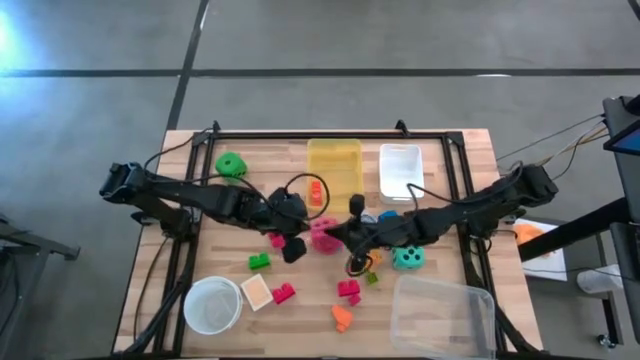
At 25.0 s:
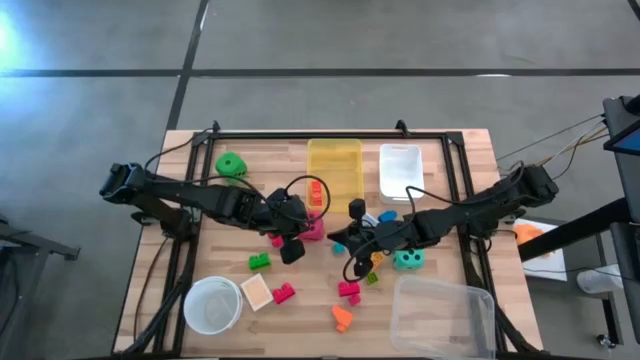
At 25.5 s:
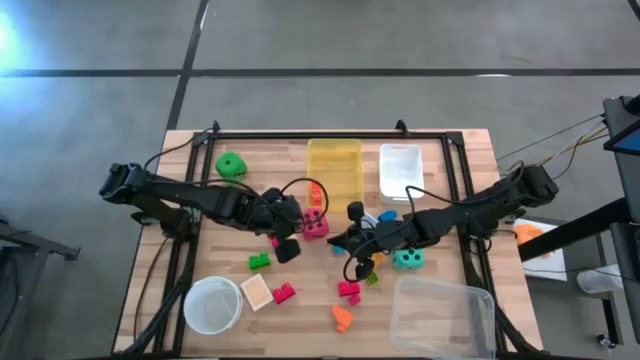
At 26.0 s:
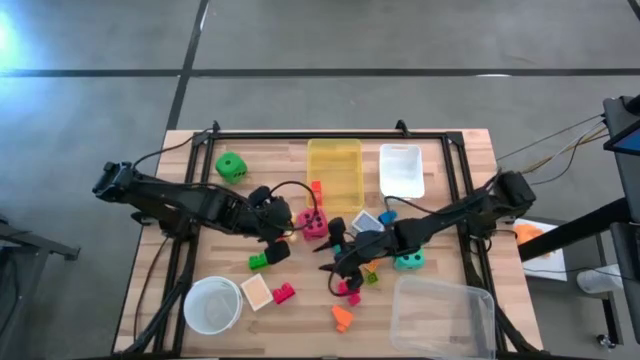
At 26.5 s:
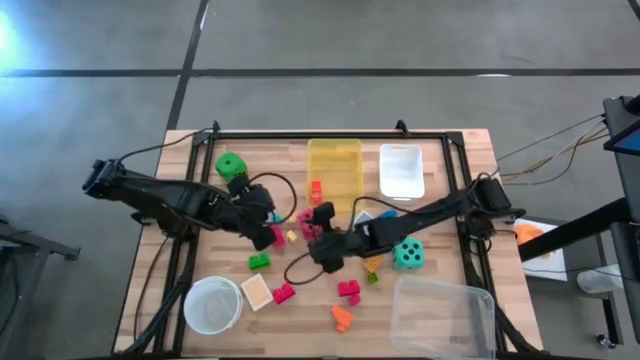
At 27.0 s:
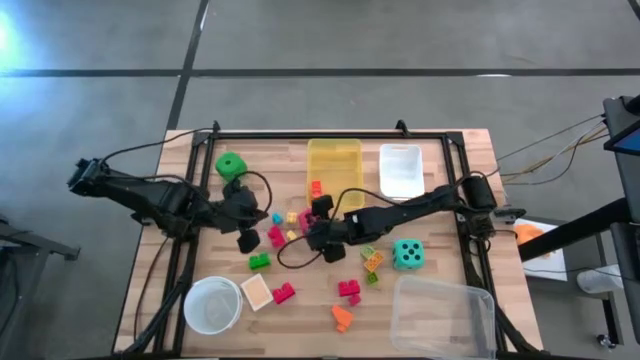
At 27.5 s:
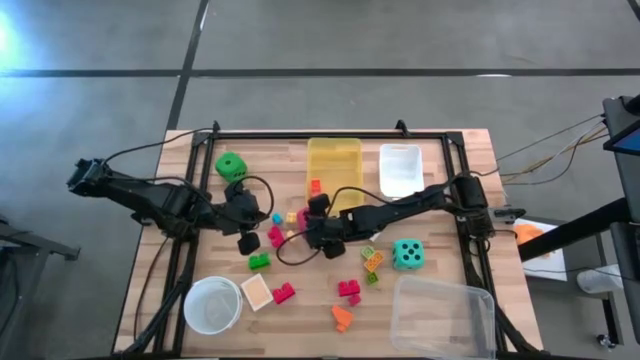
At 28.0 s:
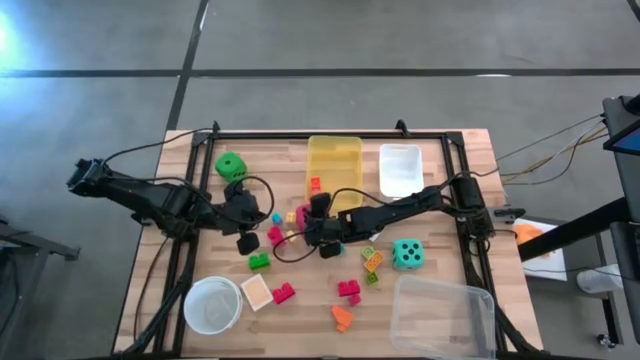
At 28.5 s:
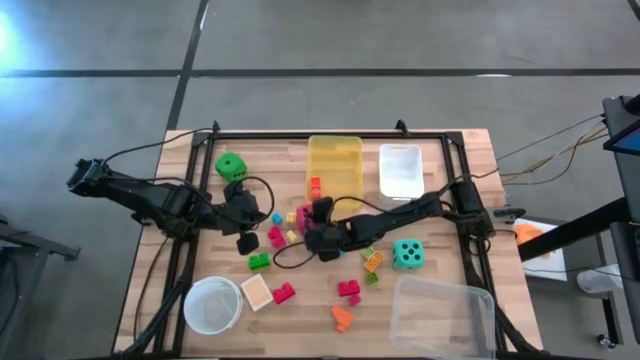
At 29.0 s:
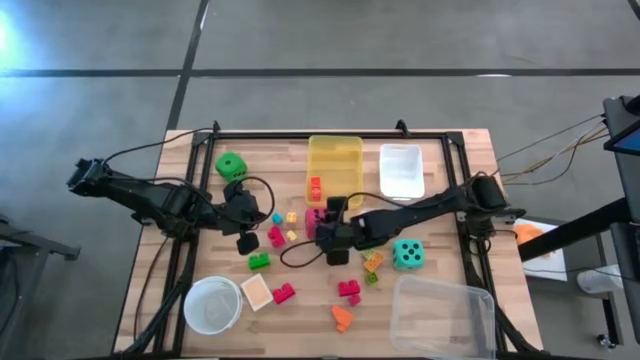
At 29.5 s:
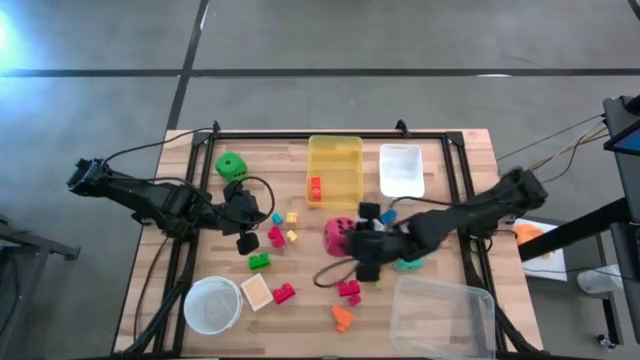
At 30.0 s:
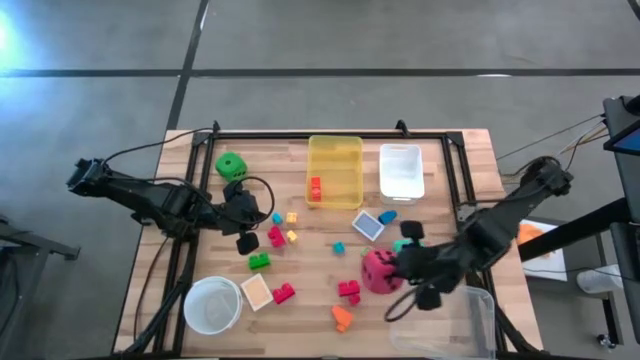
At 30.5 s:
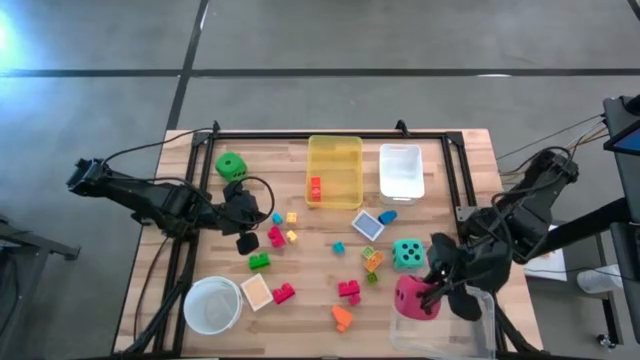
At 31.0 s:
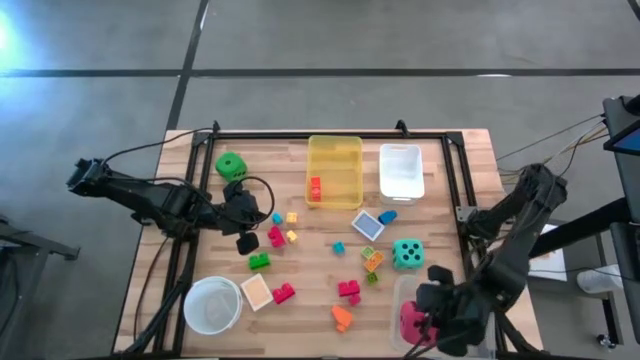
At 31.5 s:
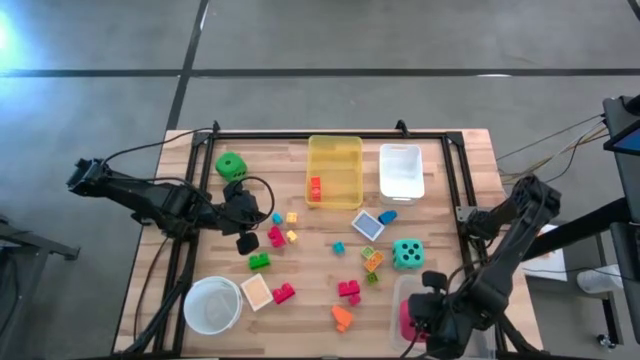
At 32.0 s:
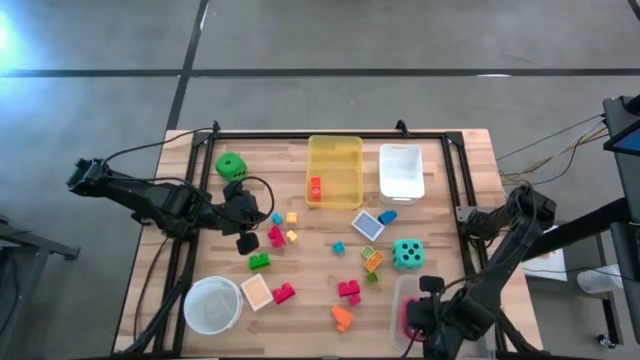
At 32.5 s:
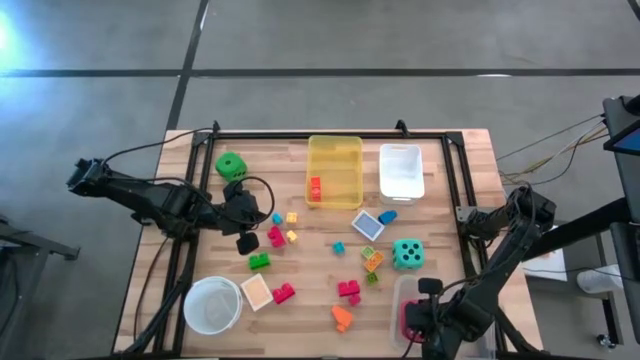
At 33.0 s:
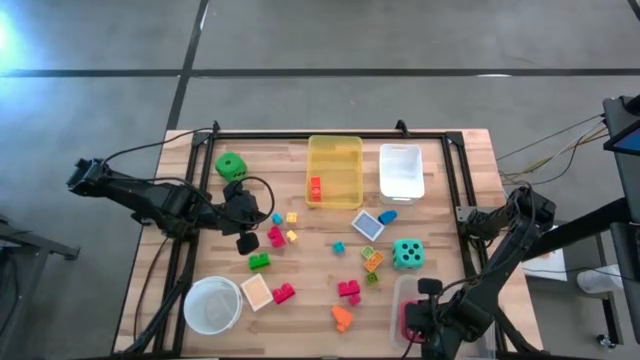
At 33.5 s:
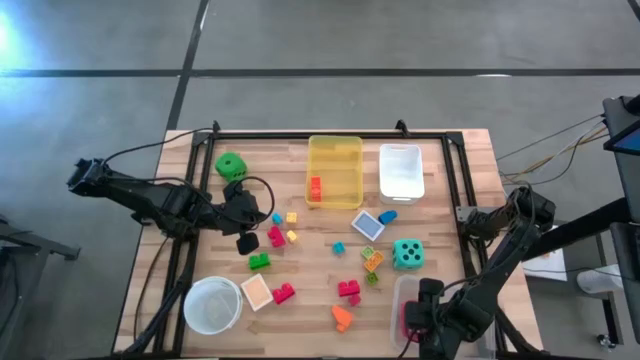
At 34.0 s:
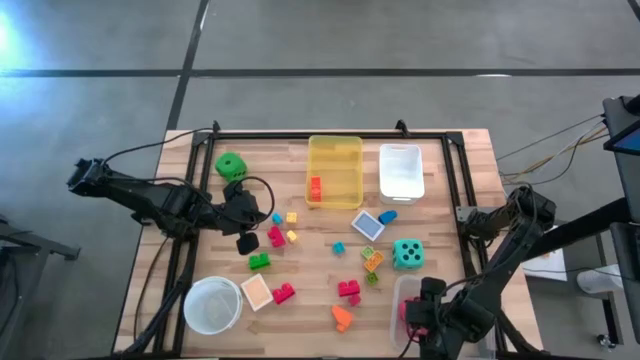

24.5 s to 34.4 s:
Task: Pick & Place Toys
Put the red dice into the transparent bin

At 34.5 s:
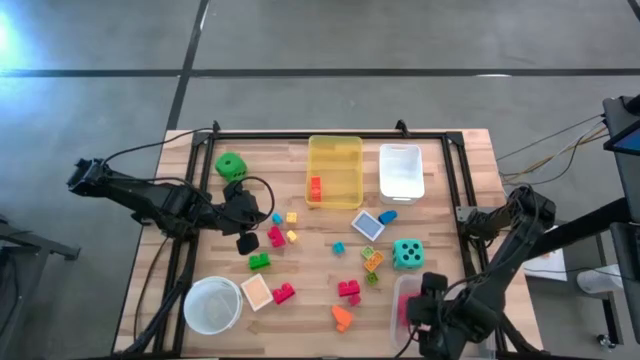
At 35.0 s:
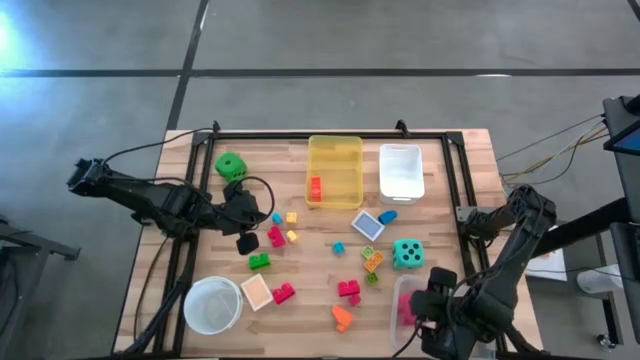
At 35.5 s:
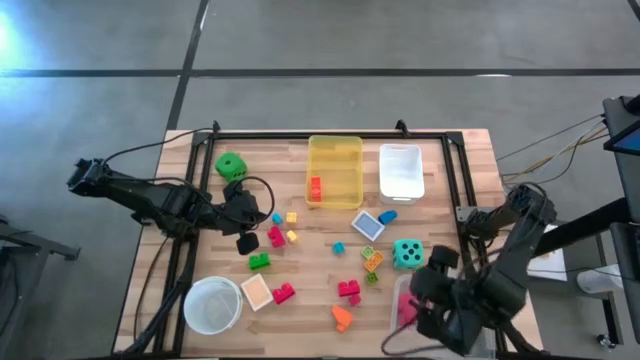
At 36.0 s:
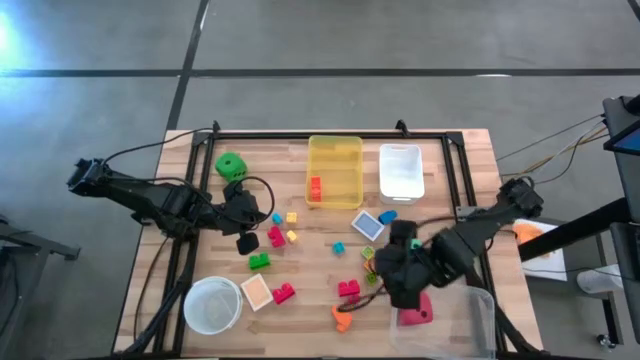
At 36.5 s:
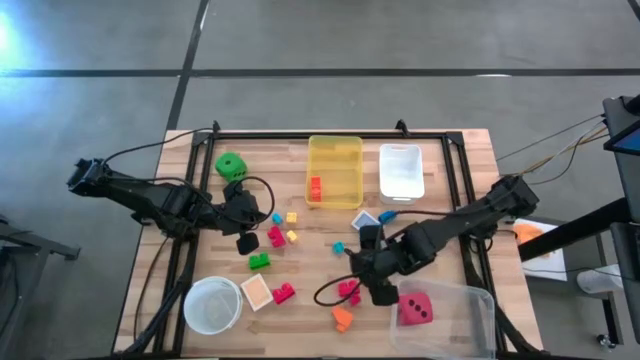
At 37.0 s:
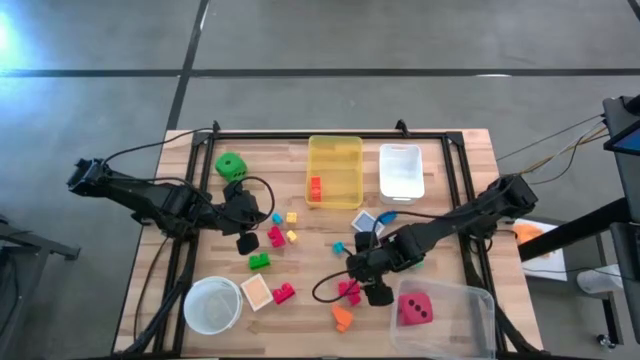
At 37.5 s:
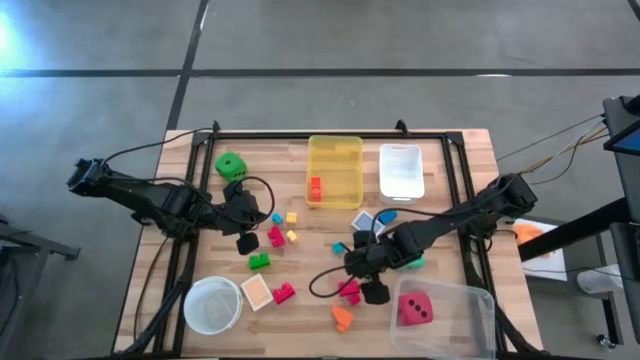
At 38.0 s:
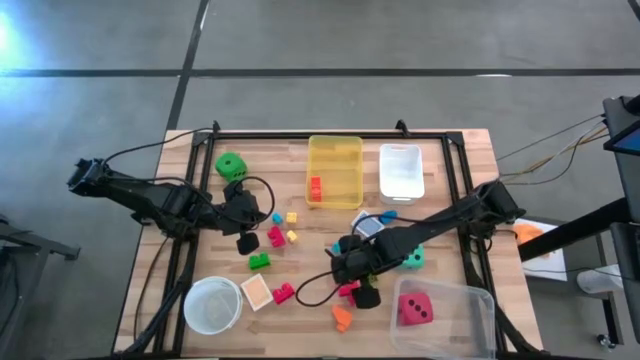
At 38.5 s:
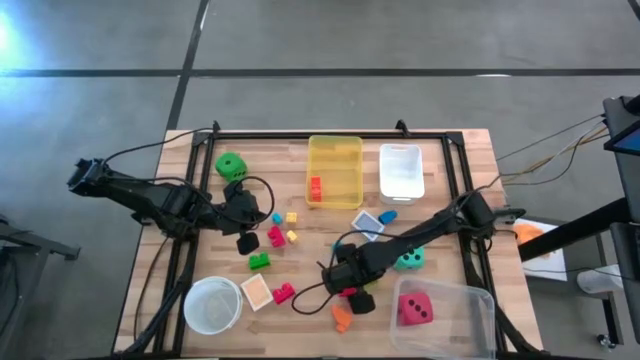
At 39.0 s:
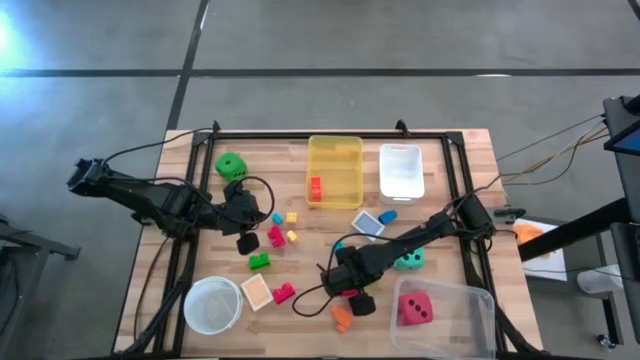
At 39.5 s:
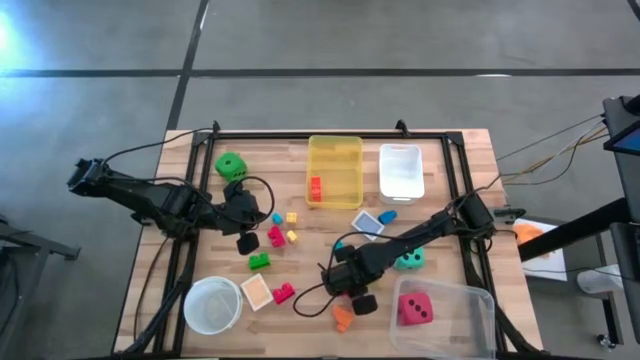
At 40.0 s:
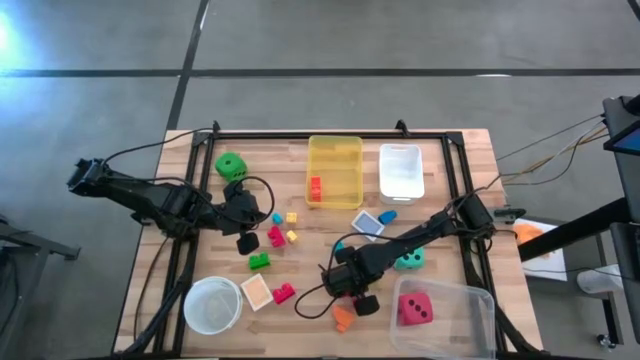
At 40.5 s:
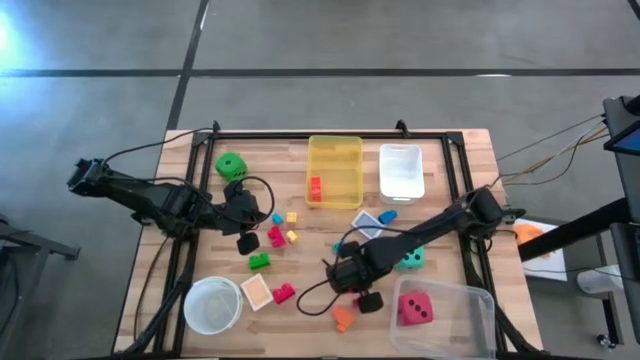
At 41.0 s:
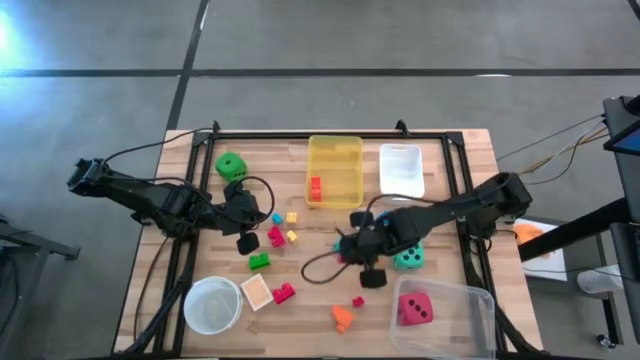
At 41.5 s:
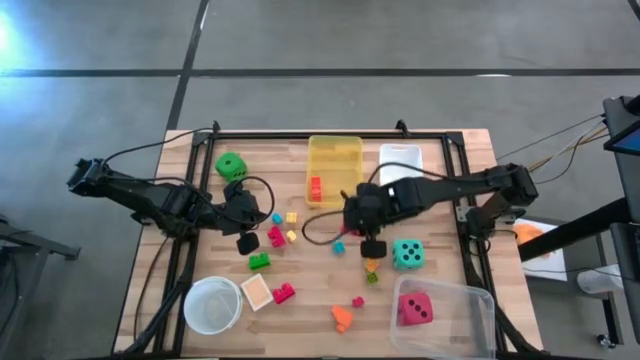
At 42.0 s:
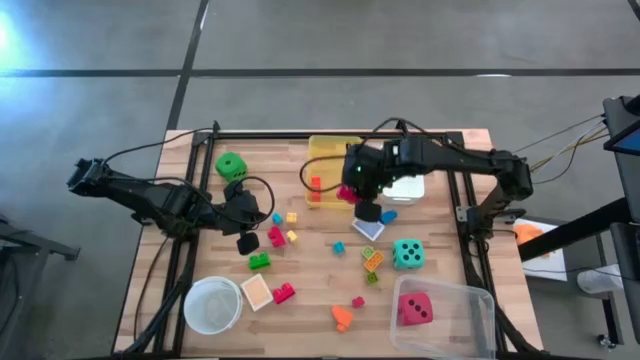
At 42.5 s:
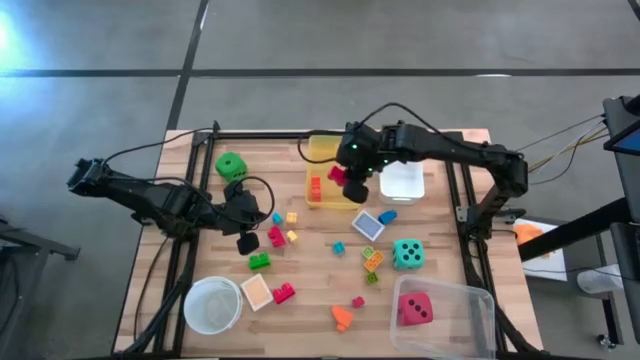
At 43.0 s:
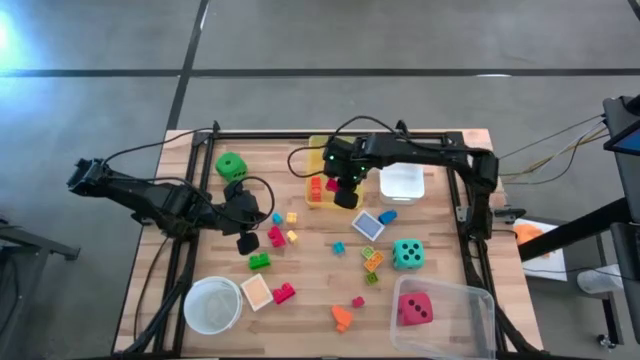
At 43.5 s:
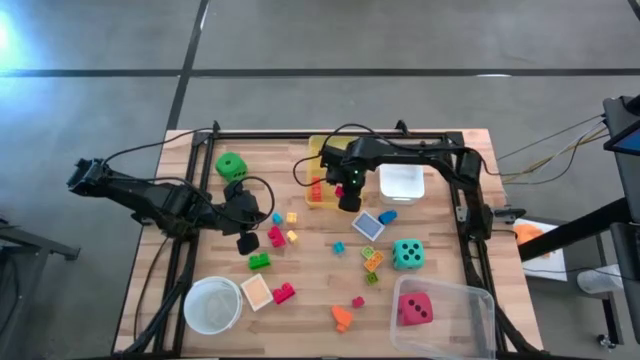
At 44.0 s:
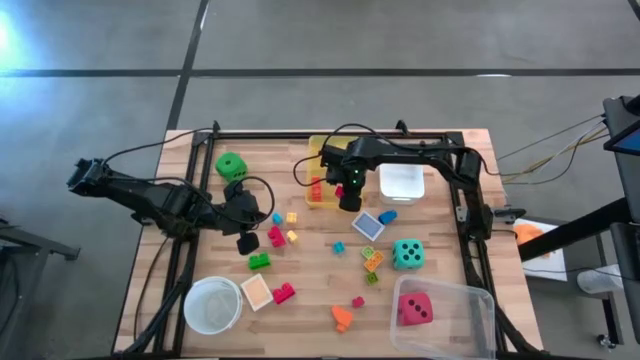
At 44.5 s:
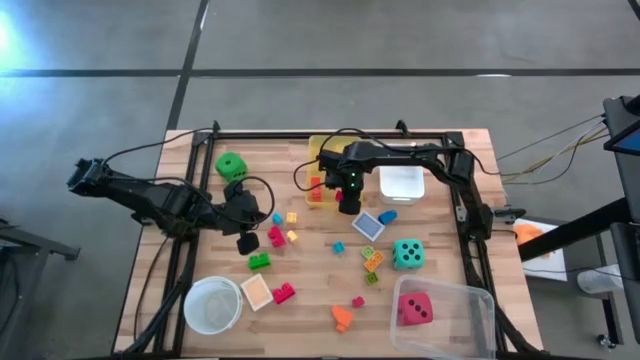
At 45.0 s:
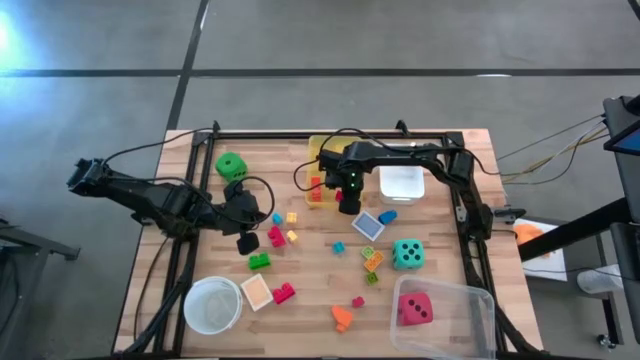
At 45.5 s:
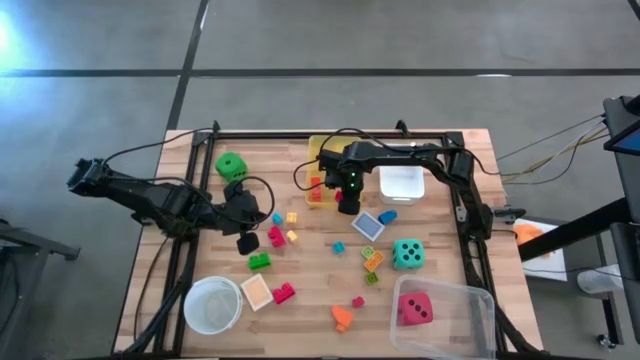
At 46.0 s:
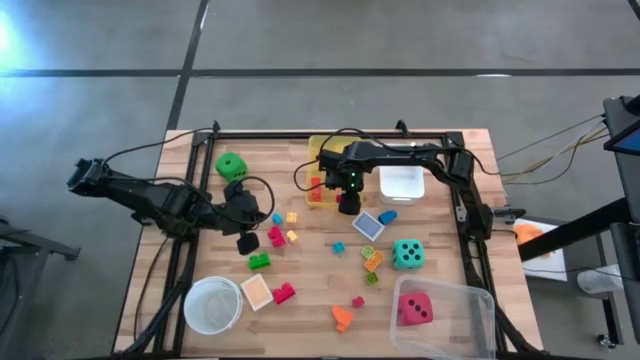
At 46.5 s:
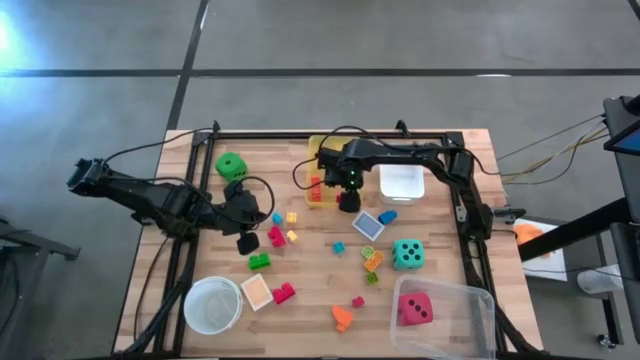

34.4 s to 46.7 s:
Put the red game piece into the yellow bin
